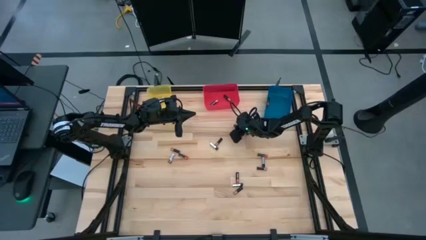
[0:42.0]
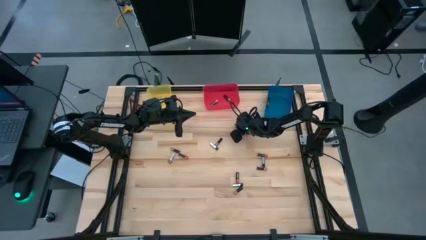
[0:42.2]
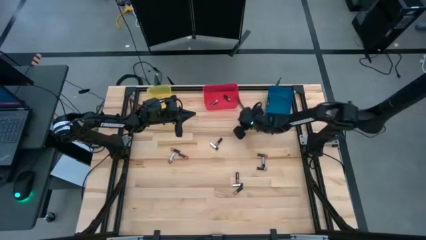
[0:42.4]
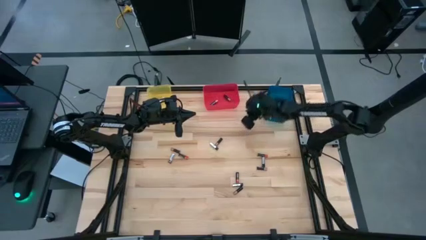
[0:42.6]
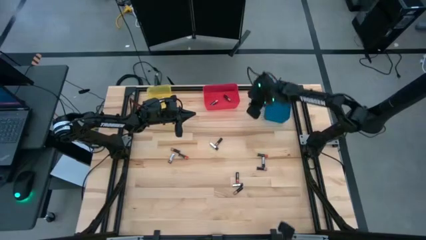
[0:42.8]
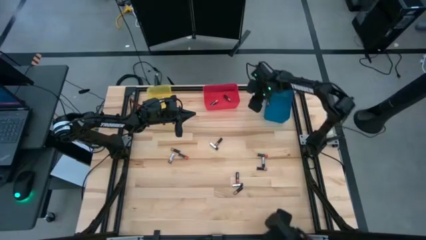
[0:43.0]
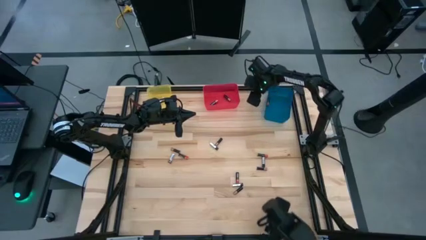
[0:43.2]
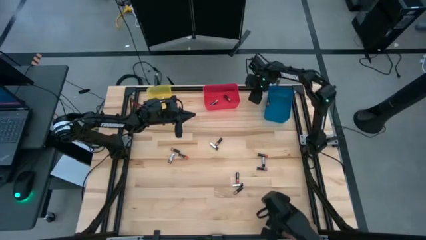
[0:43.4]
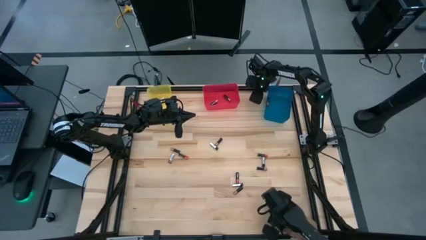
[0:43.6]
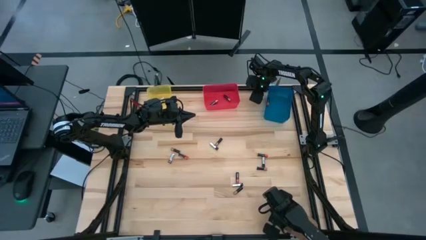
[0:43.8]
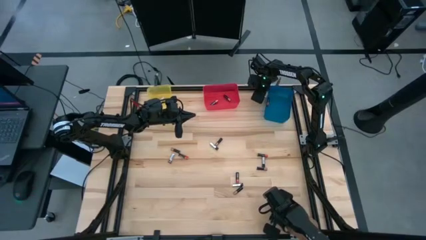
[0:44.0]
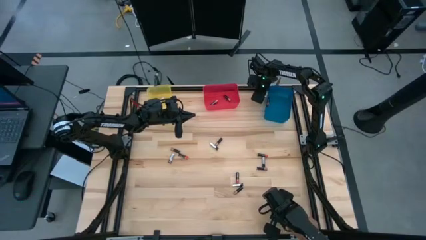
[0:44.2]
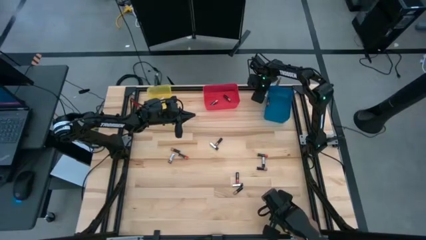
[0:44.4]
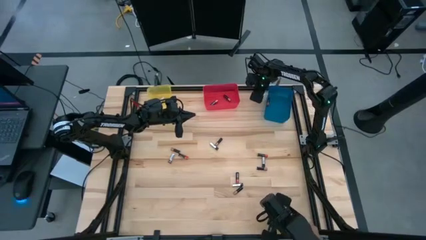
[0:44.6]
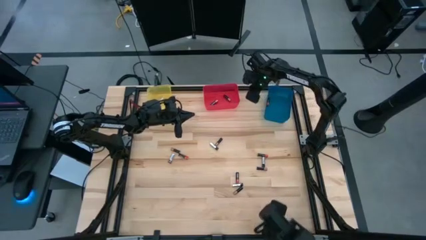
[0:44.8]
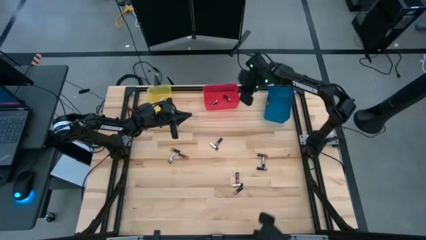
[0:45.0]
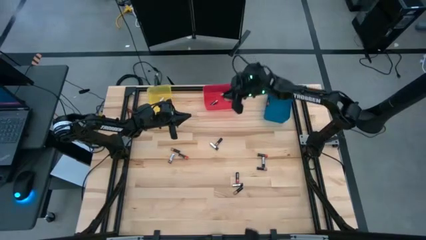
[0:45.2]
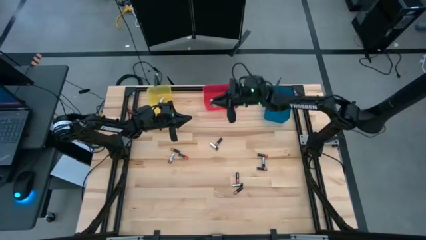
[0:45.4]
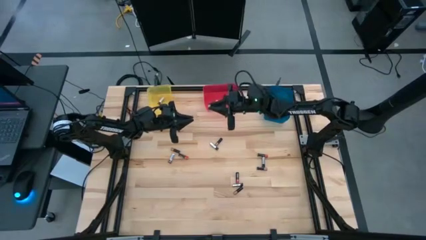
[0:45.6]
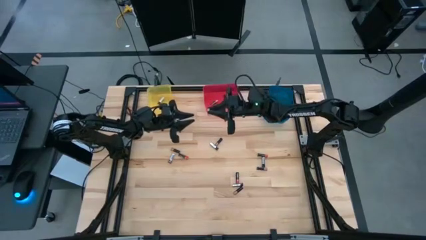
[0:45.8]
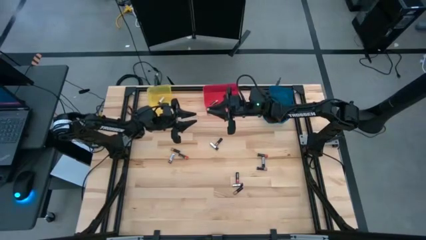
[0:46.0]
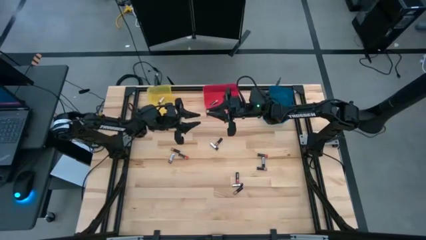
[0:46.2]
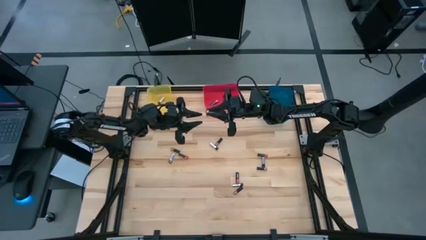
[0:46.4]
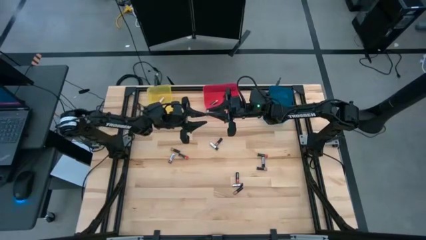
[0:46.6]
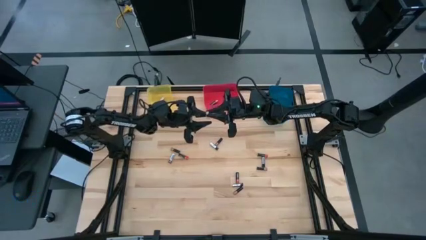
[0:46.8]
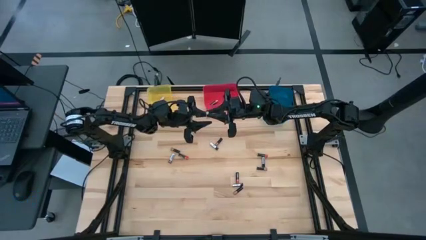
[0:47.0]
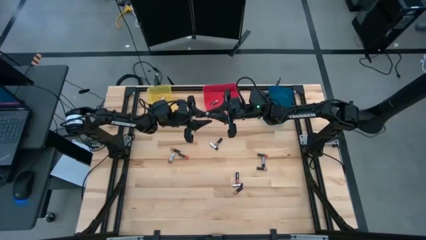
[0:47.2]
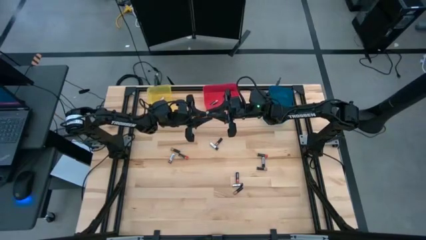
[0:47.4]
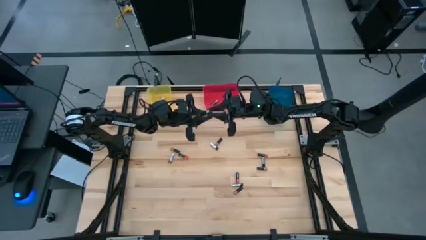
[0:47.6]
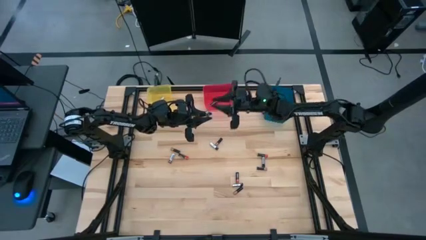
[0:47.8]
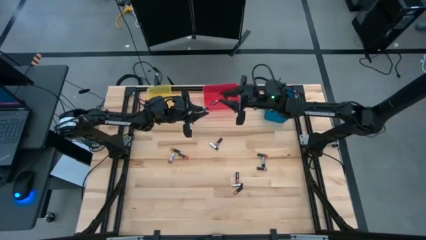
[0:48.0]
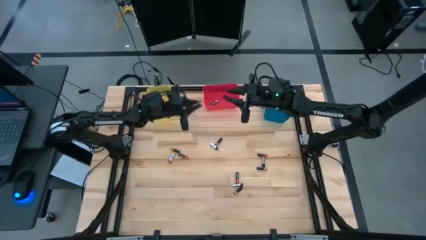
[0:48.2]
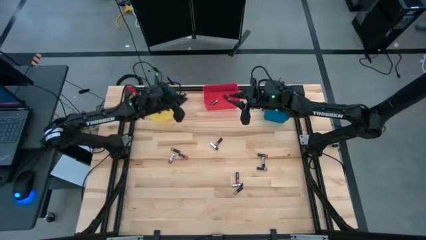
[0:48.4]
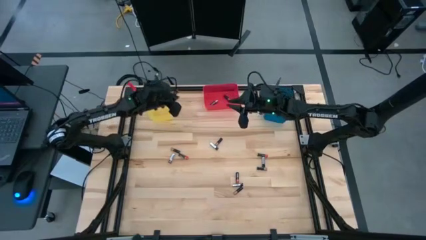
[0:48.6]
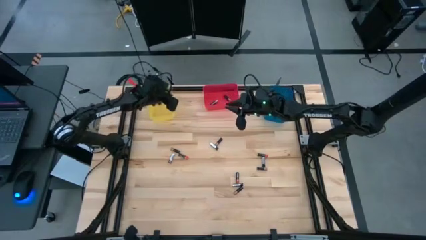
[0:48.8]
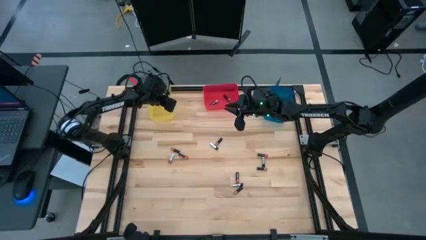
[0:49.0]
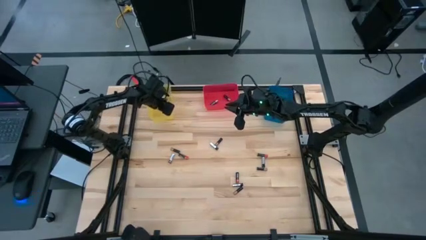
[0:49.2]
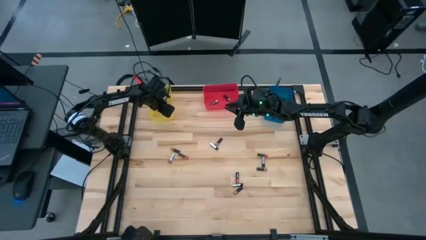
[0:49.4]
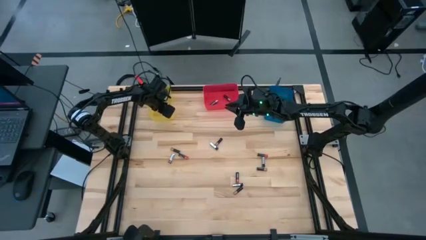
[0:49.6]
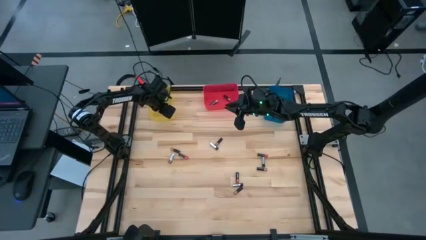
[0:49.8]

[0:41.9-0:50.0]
Task: Sort batteries
Put the silver battery into the yellow bin

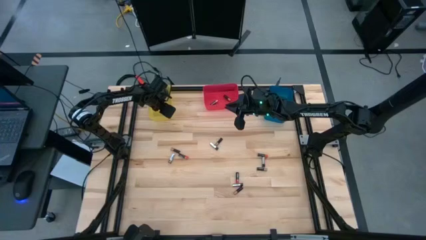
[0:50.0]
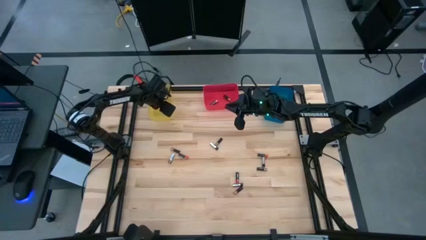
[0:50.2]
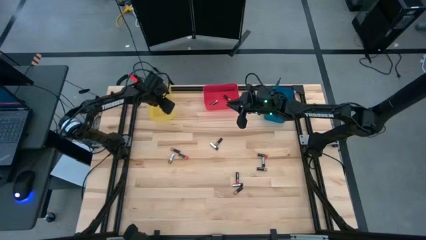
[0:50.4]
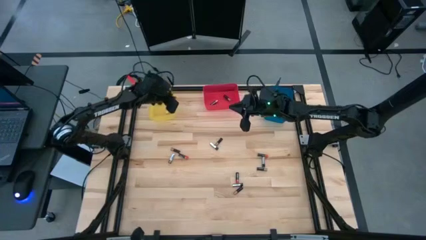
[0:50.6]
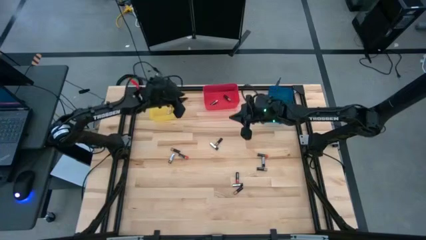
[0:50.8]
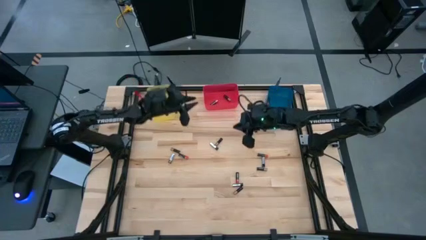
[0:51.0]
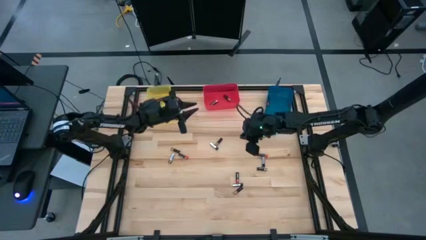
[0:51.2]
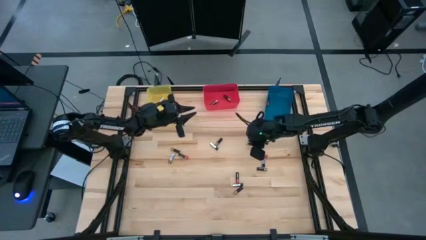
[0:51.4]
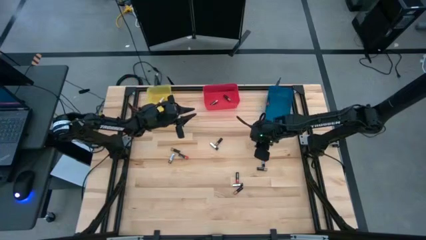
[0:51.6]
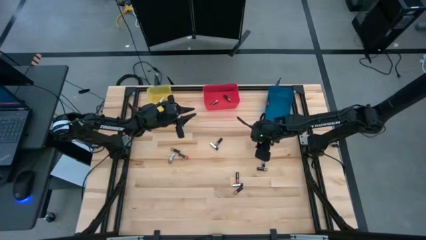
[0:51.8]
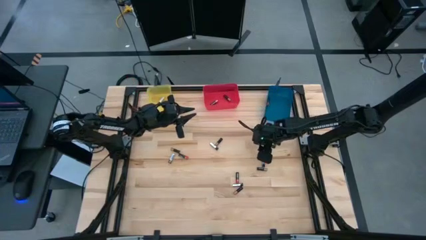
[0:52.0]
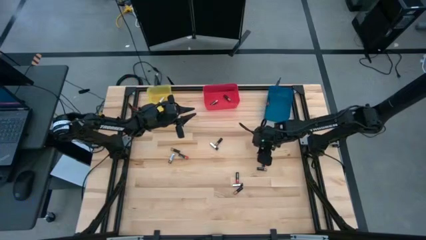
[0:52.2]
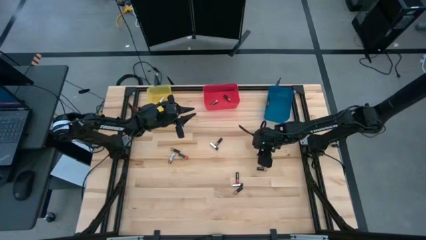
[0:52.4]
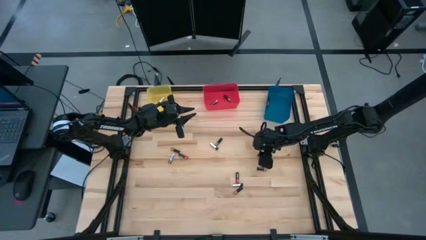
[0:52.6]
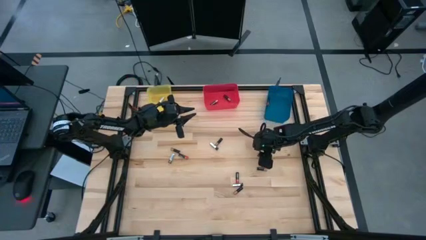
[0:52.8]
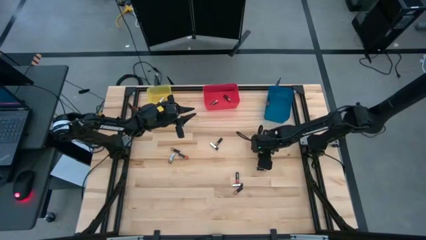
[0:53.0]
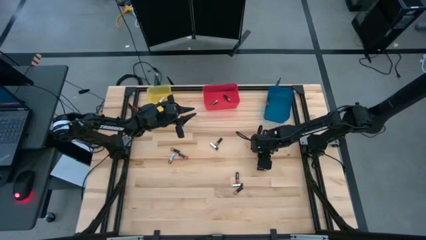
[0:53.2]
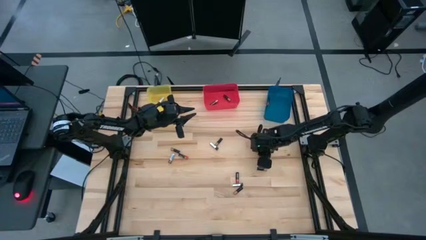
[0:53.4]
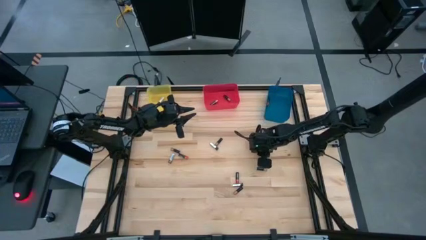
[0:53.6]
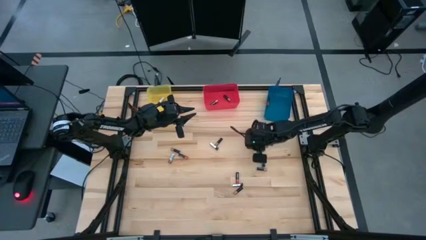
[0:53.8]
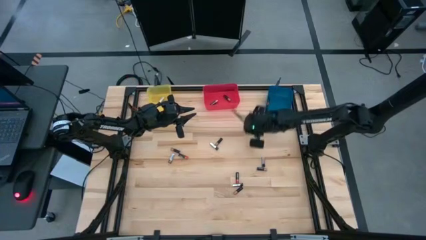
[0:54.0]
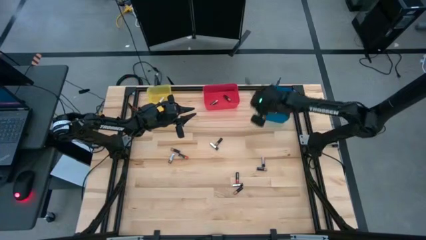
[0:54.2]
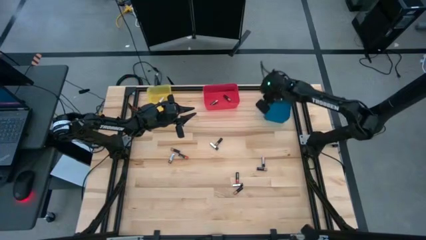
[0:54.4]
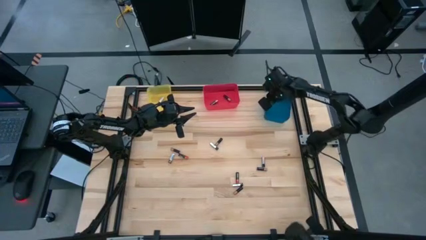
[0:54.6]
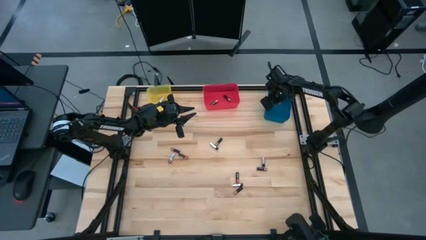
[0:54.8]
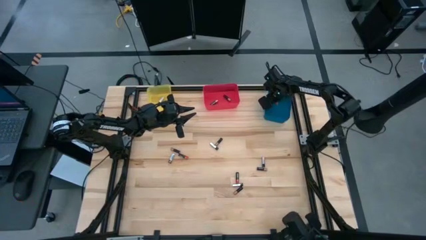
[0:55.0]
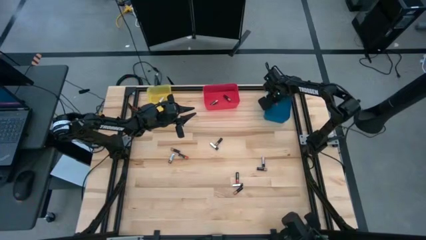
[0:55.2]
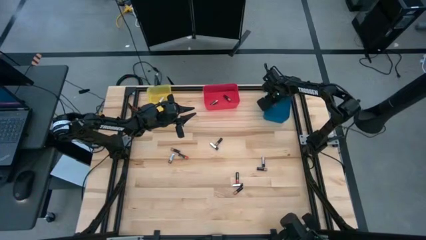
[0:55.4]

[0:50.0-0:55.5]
Put the red battery into the blue bin

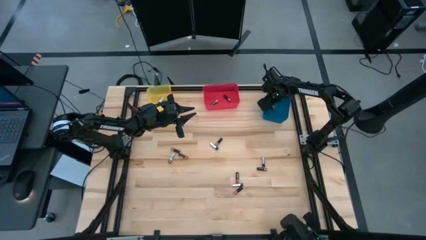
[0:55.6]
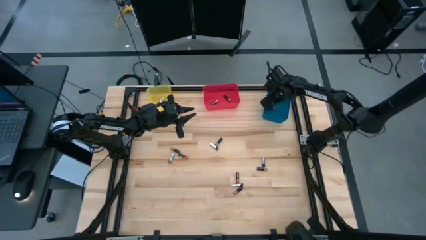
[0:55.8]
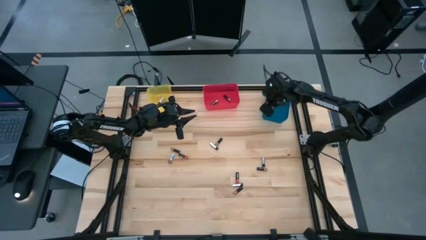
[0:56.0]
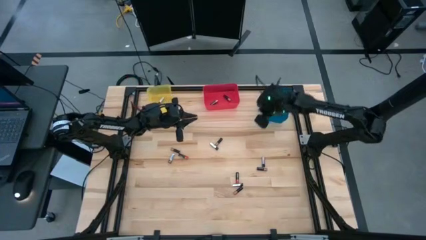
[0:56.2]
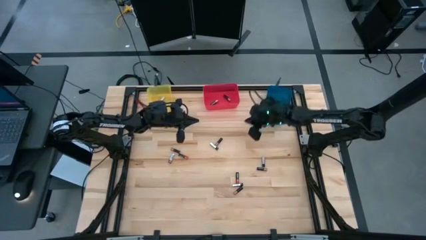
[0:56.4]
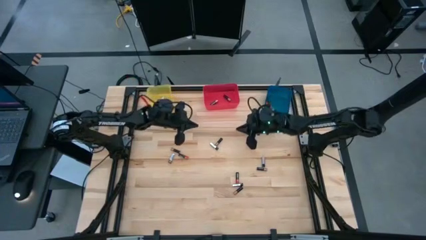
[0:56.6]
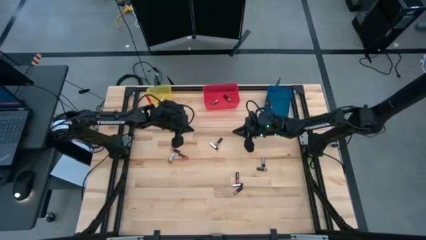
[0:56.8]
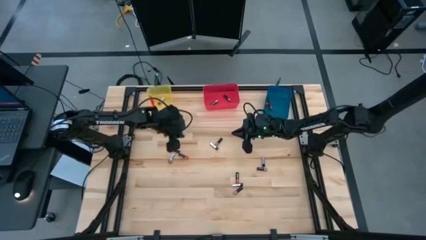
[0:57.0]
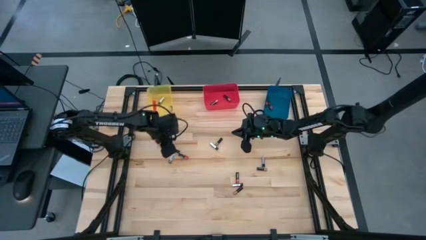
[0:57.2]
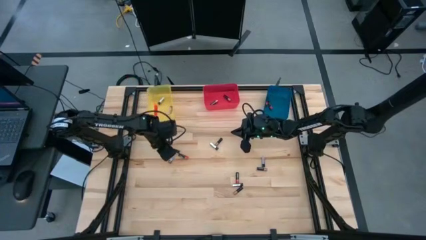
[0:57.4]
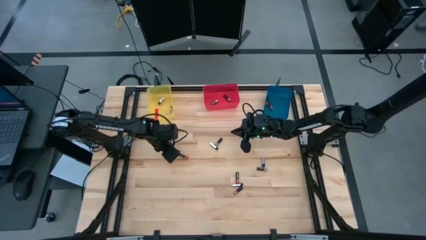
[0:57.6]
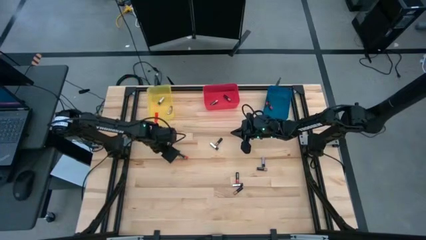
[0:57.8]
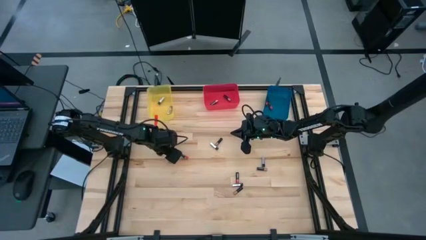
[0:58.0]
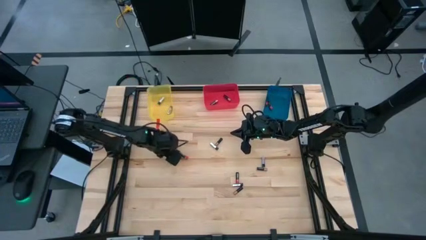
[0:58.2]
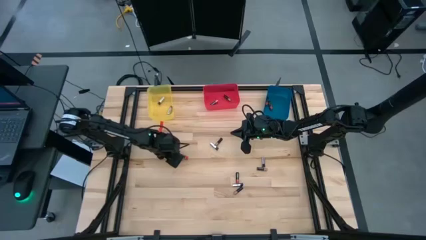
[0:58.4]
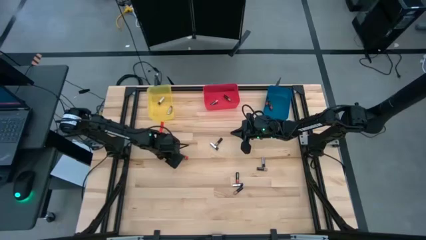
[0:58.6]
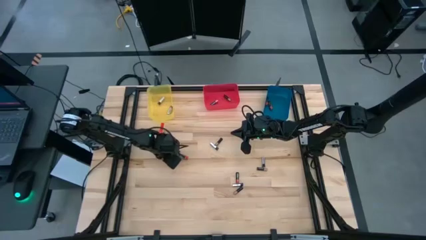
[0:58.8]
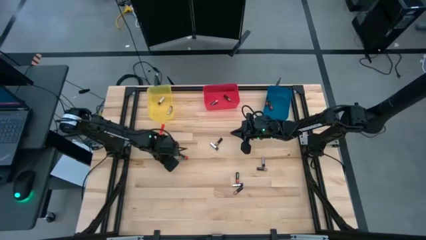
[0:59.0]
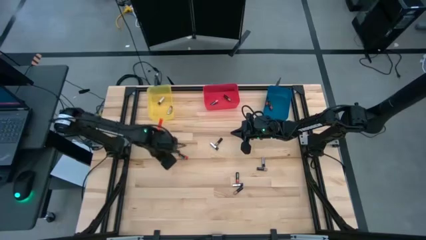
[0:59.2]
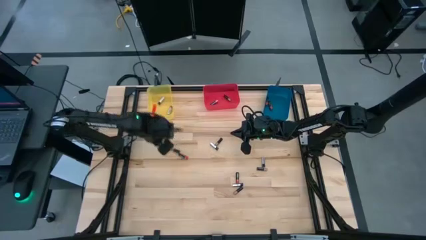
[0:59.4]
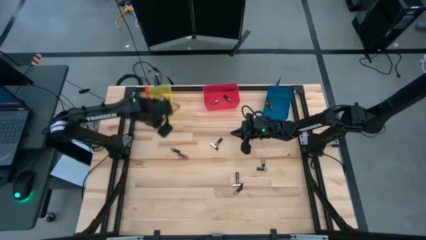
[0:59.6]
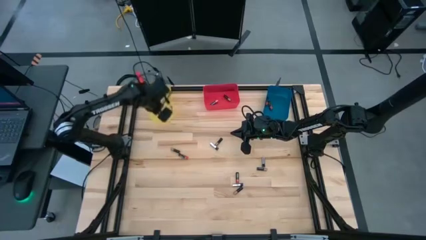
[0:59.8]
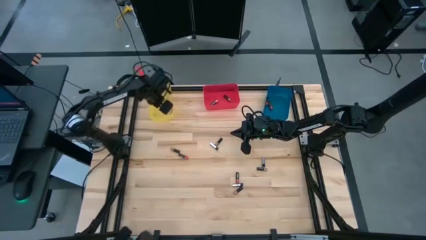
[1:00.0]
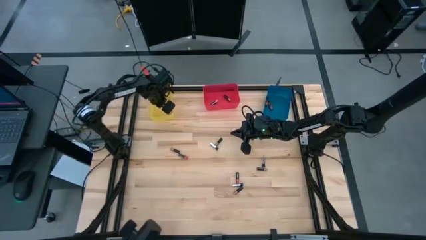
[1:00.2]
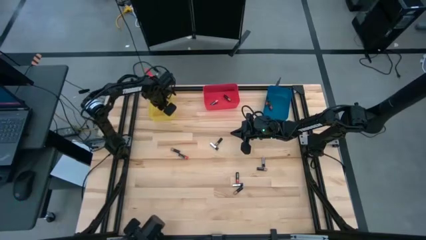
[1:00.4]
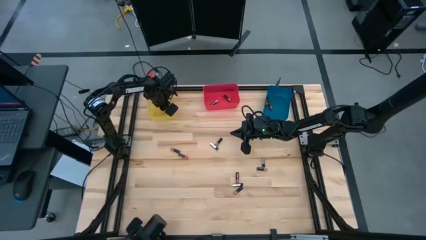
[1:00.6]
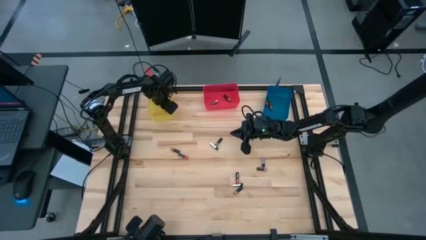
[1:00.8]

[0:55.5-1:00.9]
Put the silver battery into the yellow bin
